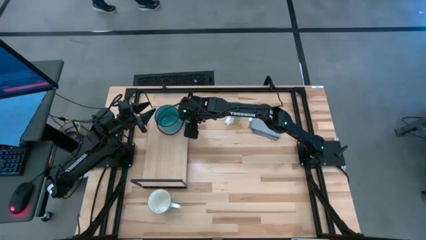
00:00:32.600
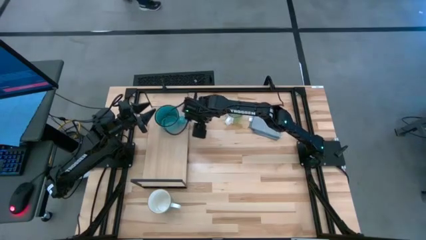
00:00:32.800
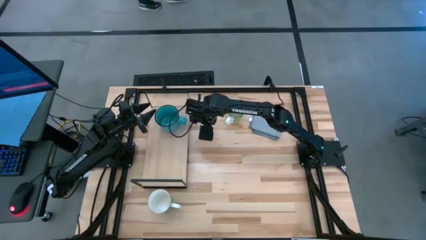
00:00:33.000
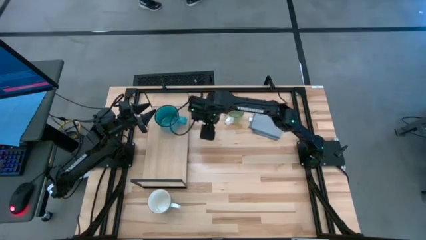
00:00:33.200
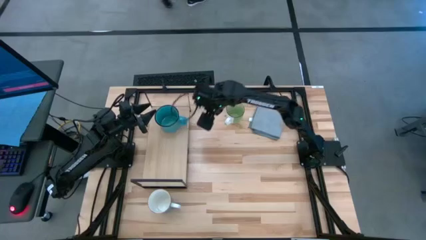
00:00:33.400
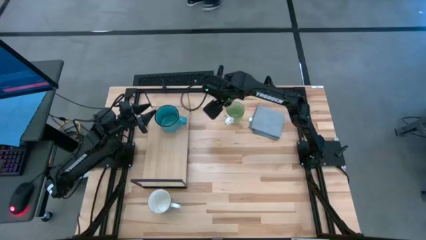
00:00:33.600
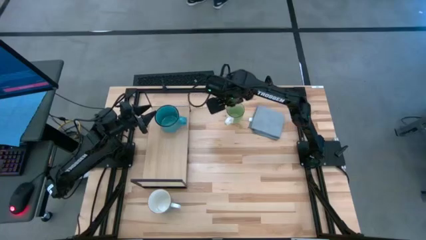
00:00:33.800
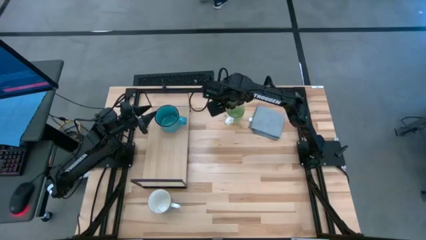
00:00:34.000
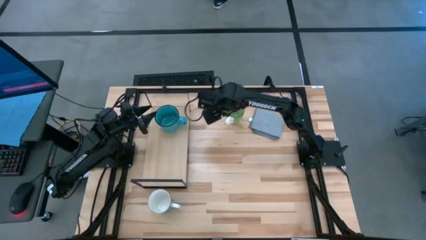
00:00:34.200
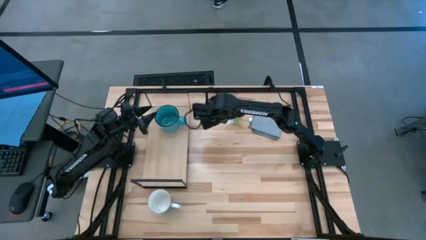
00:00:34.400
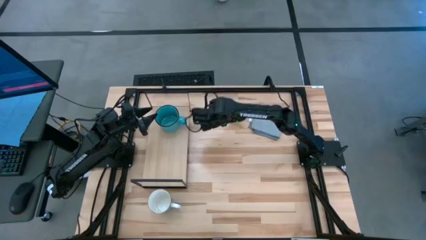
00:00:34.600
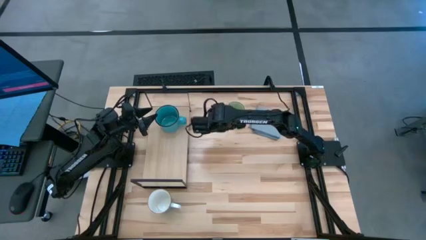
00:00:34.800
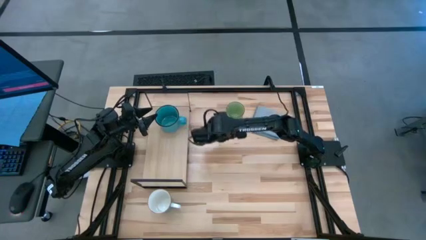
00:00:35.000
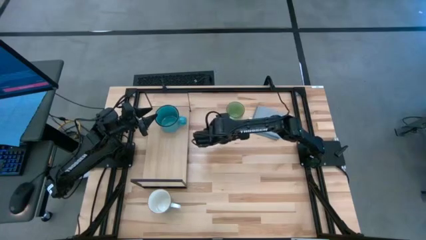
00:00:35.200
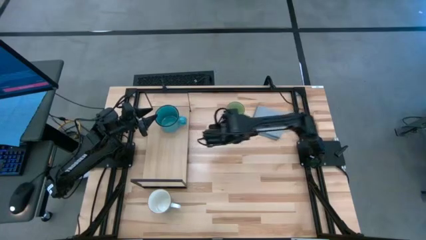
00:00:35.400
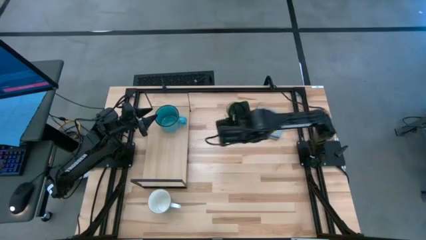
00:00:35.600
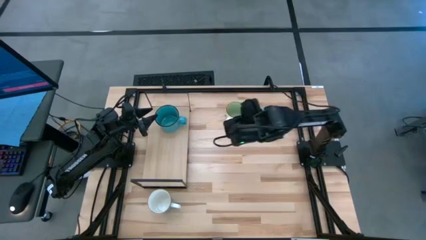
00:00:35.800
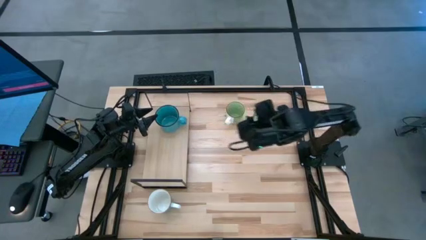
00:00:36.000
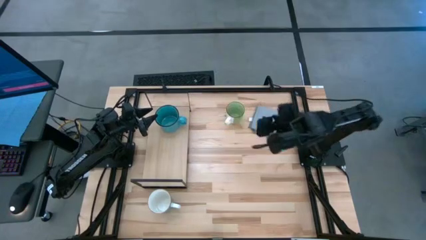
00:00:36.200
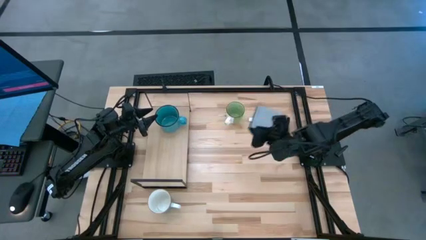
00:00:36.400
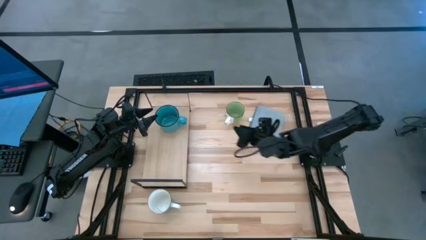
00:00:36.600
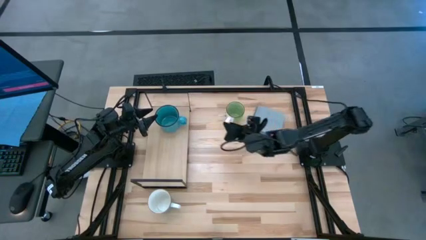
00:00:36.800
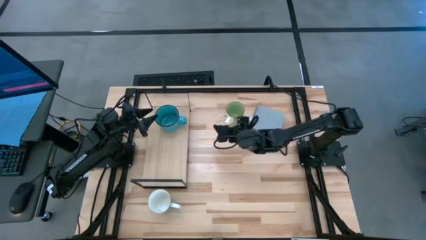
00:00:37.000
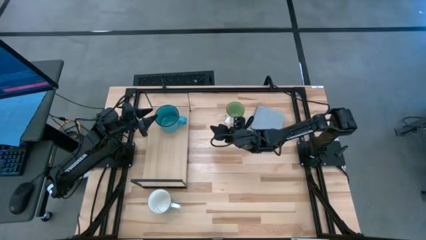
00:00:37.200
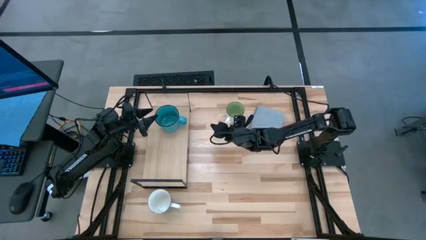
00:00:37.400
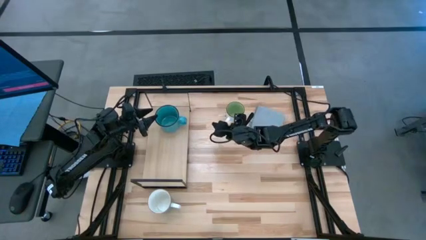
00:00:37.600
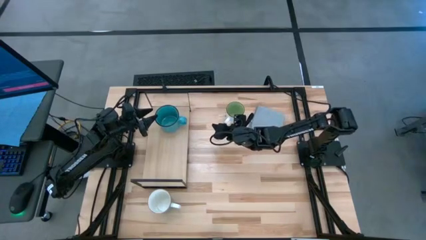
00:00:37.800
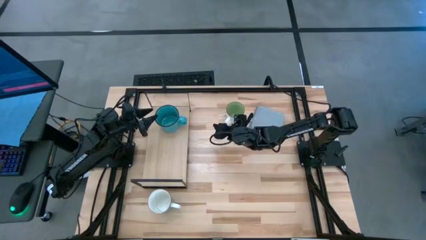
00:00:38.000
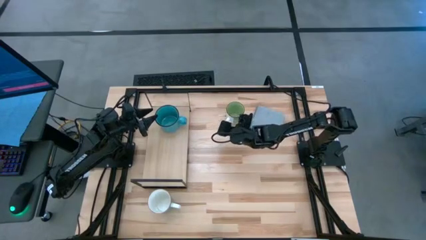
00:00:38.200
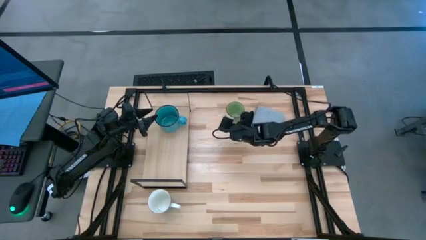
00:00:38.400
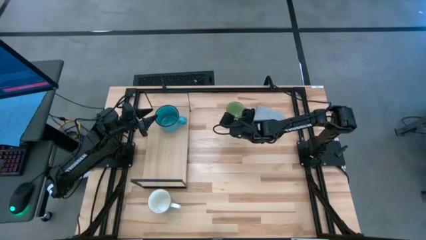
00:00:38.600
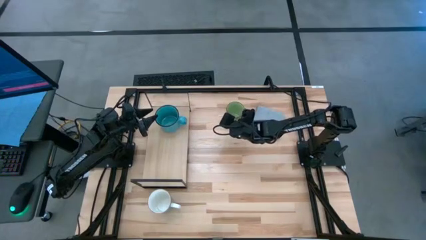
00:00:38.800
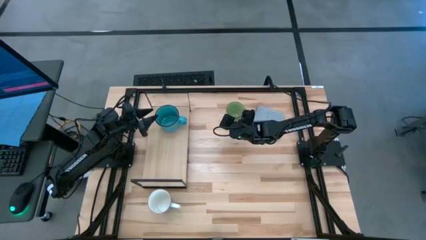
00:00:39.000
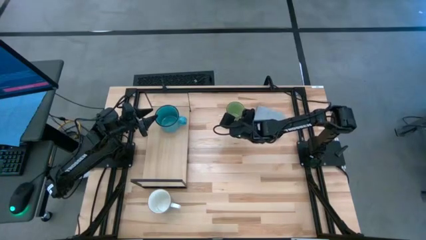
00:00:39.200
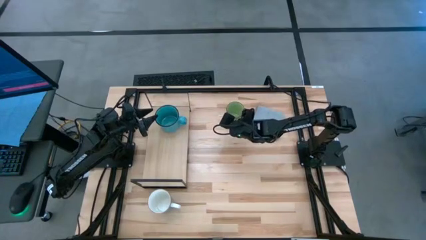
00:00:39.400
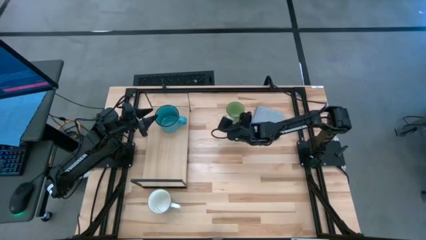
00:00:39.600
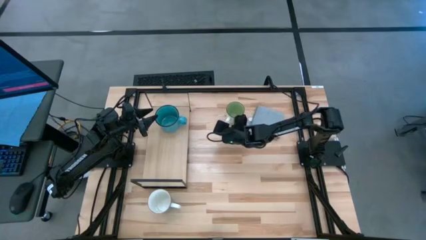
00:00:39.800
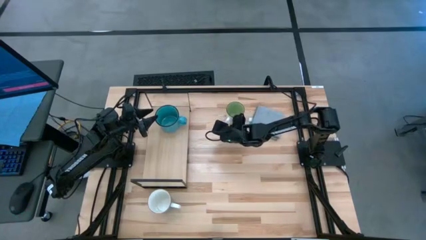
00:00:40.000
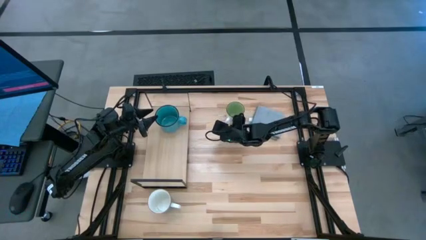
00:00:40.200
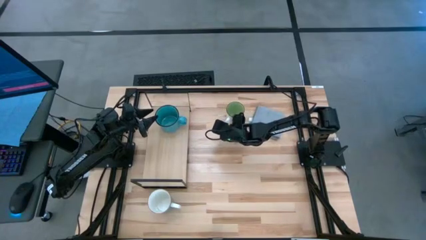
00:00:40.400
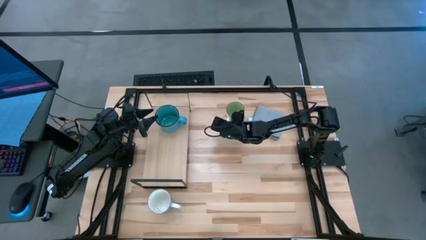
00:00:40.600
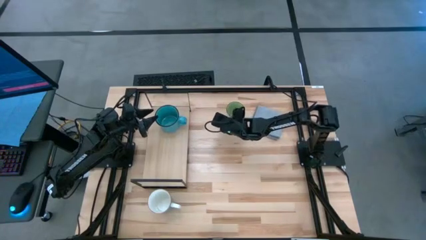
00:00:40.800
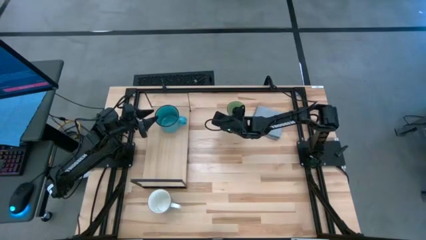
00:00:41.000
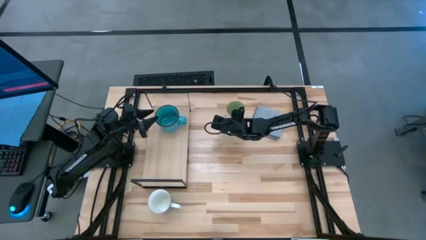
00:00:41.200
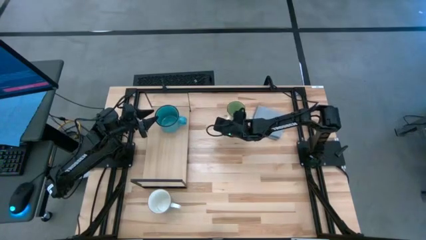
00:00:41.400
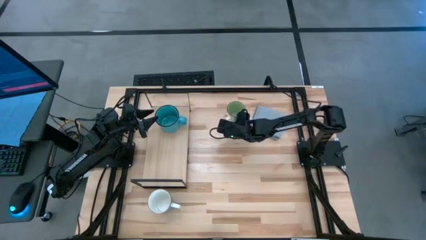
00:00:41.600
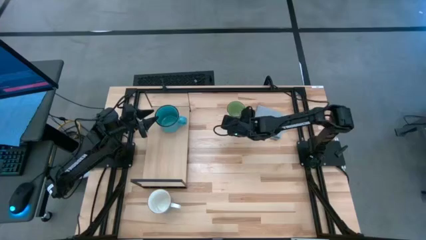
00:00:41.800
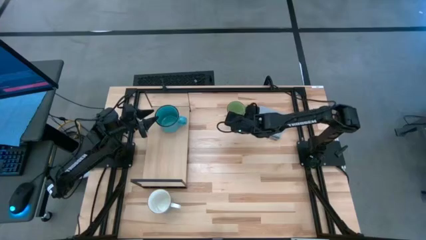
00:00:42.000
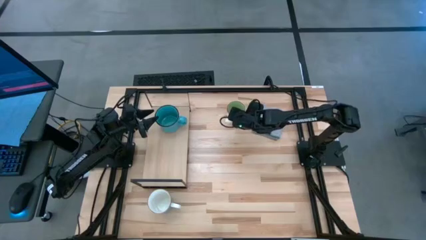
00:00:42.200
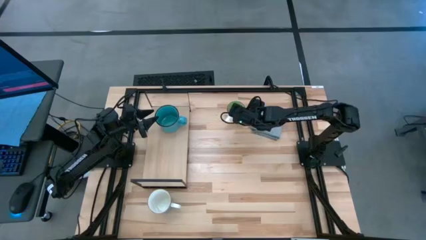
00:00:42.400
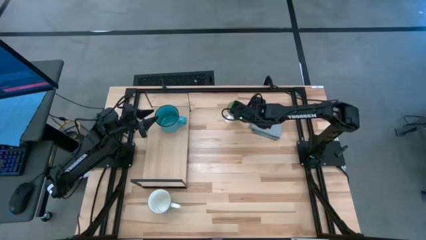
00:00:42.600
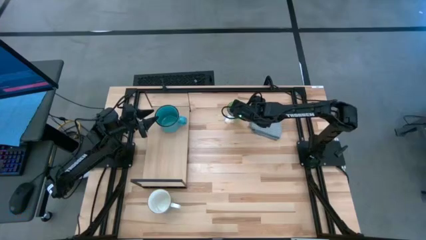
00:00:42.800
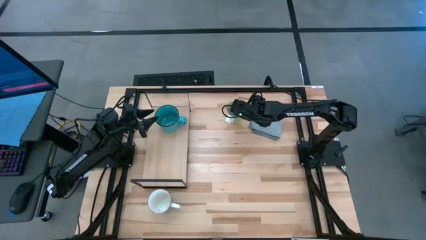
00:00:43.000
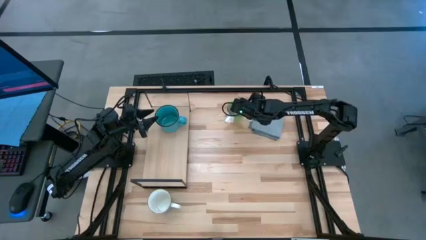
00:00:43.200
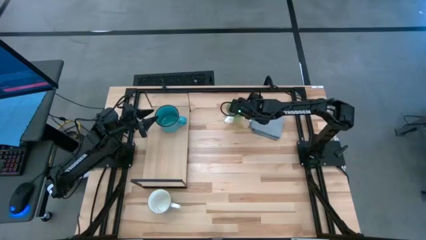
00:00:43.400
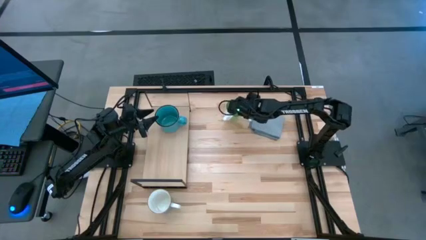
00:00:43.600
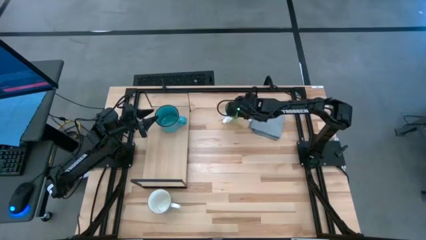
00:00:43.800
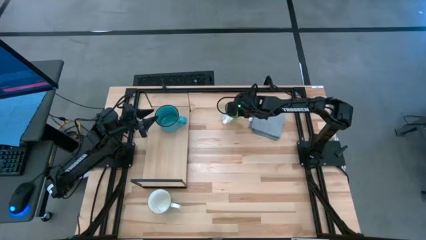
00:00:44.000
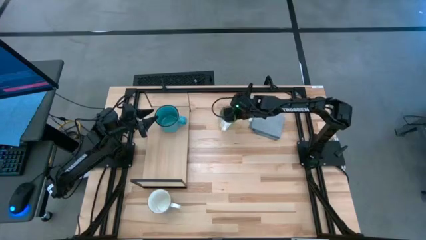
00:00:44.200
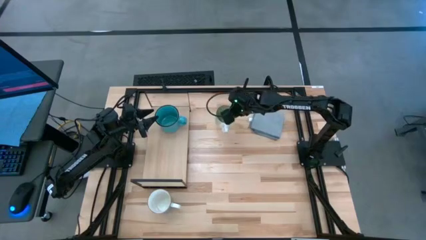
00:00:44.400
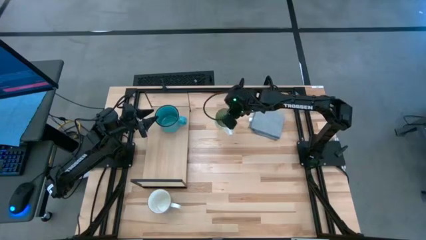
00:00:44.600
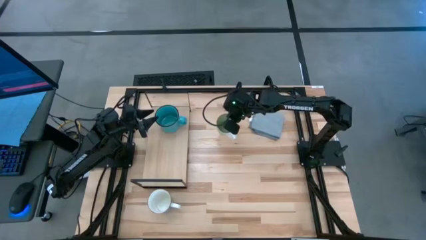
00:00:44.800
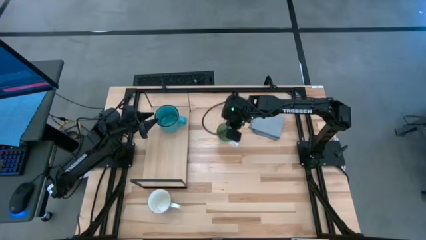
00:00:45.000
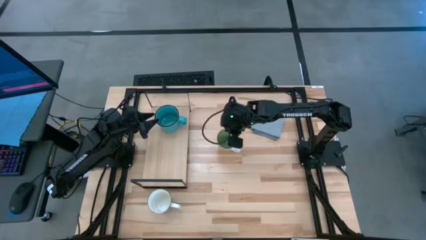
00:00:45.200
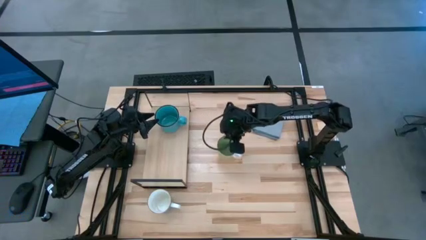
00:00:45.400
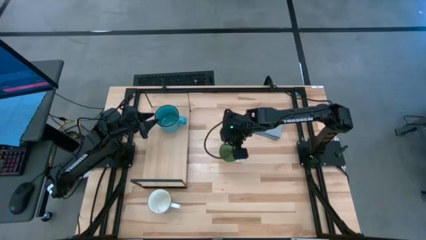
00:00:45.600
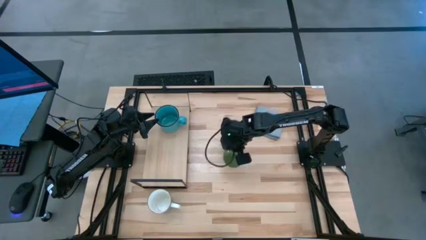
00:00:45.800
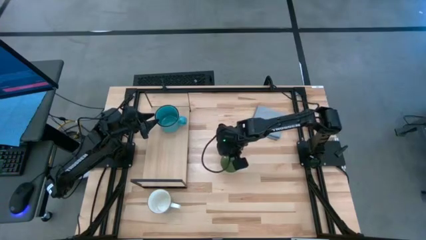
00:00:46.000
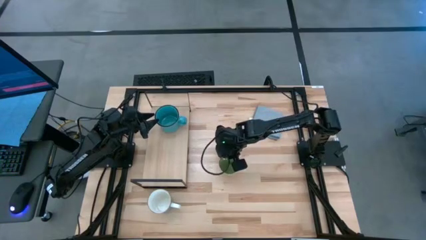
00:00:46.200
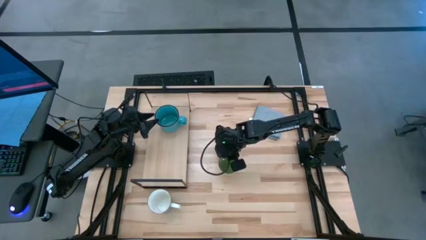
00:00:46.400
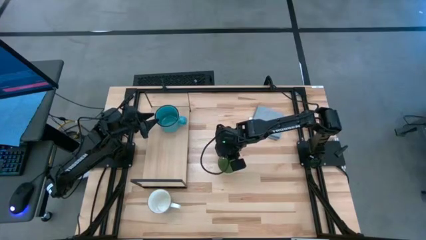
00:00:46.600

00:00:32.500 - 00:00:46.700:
Task: Stack small to large cups/mugs on shelf
Put the green mug on the shelf
